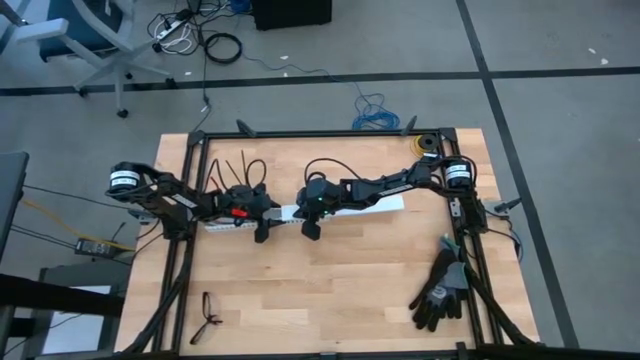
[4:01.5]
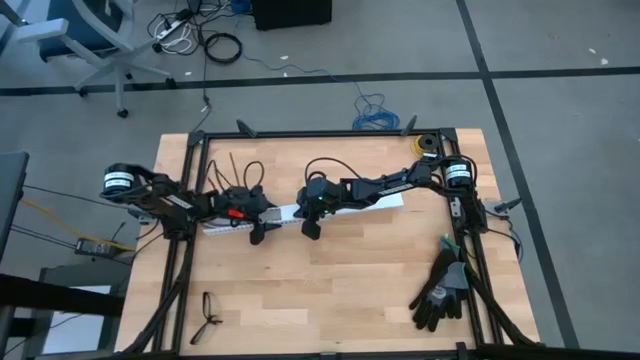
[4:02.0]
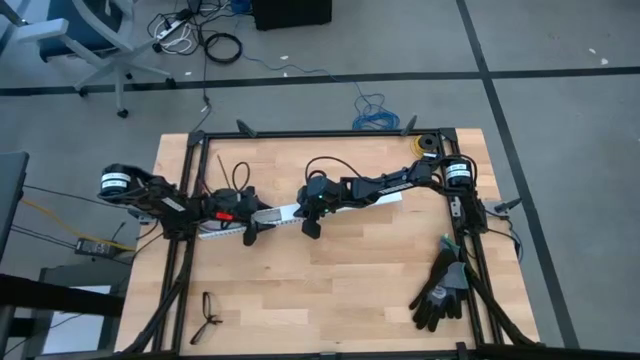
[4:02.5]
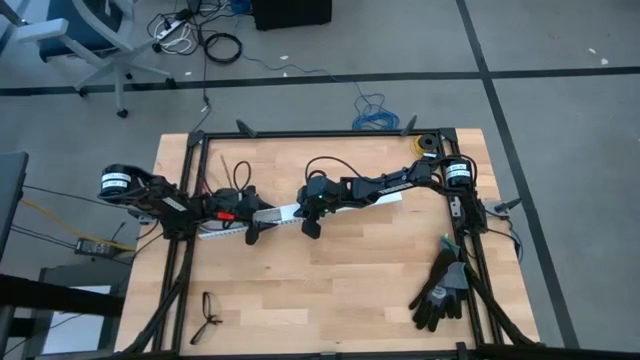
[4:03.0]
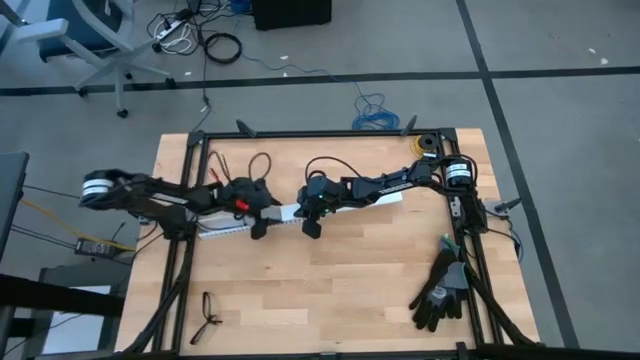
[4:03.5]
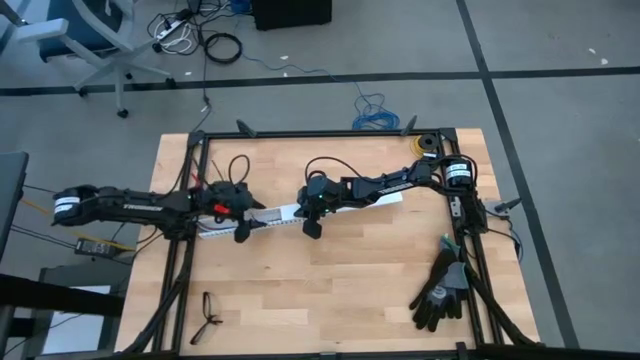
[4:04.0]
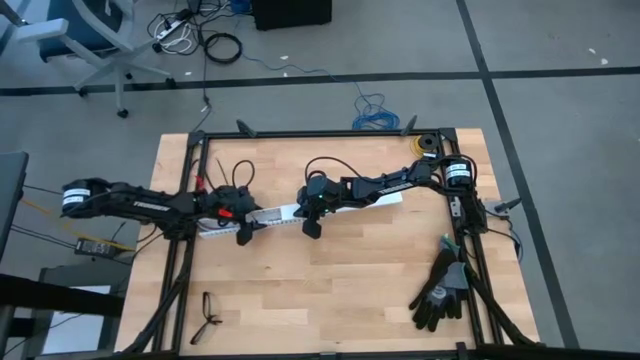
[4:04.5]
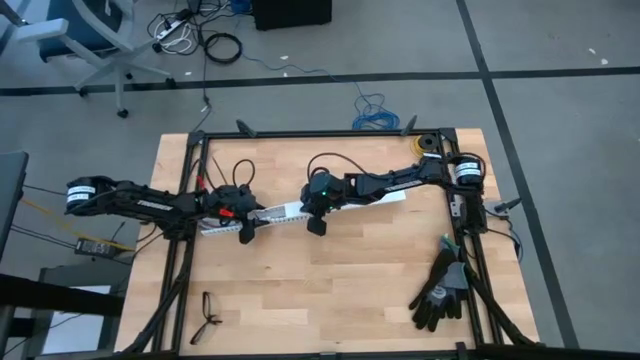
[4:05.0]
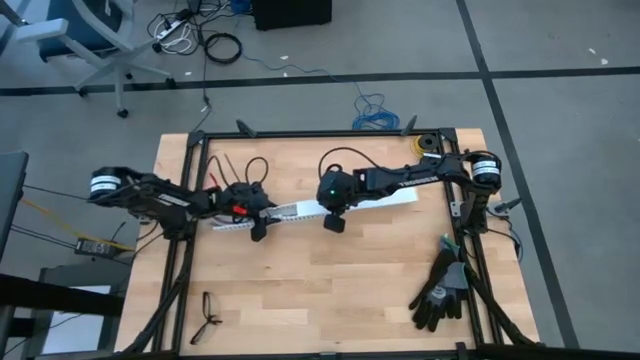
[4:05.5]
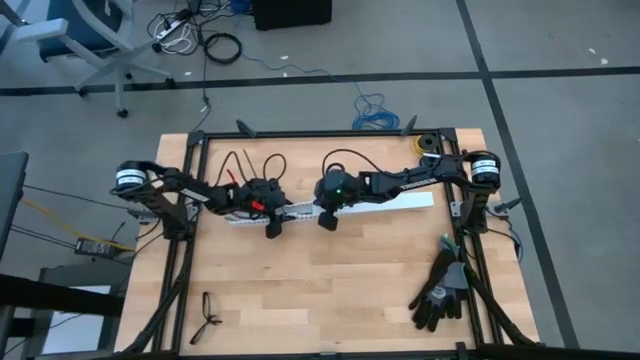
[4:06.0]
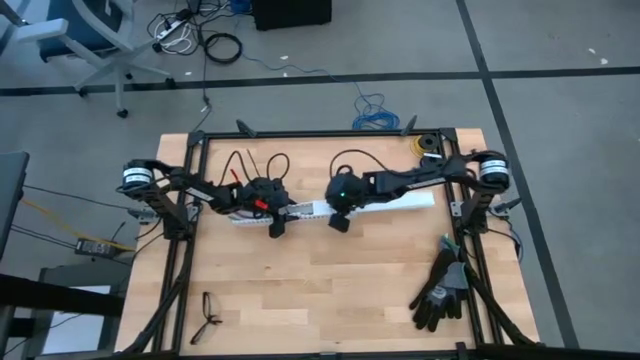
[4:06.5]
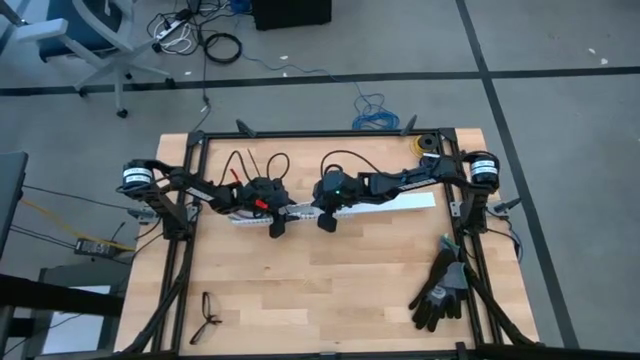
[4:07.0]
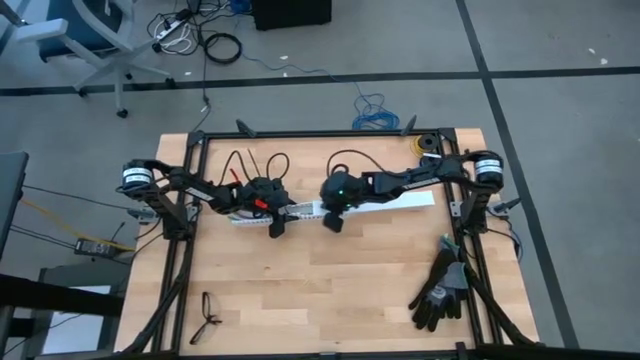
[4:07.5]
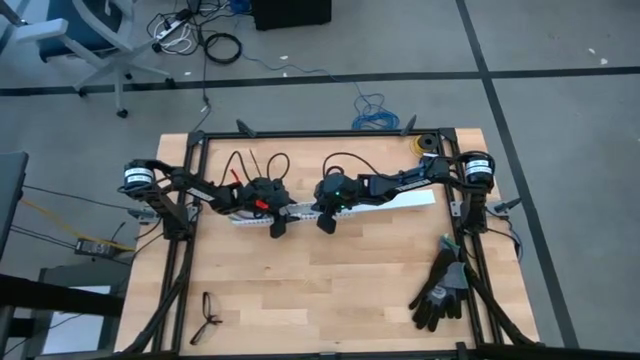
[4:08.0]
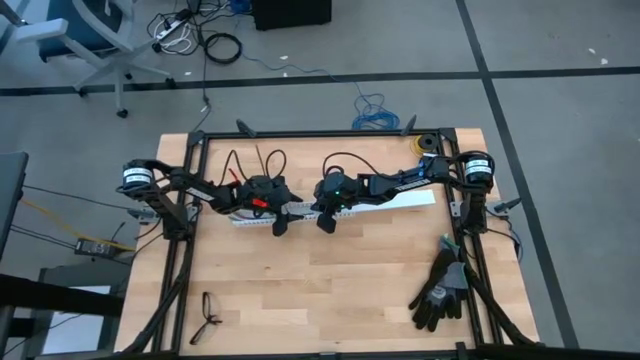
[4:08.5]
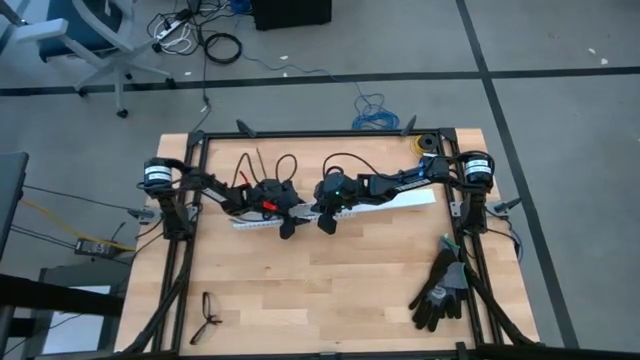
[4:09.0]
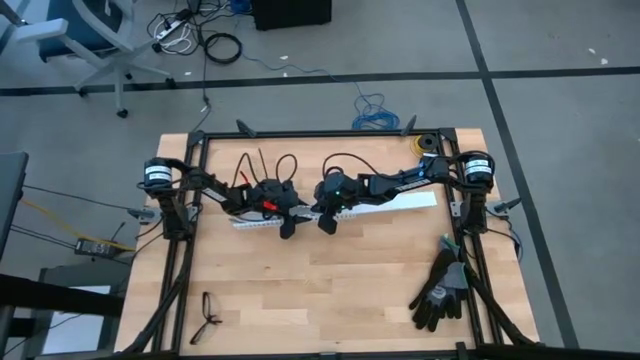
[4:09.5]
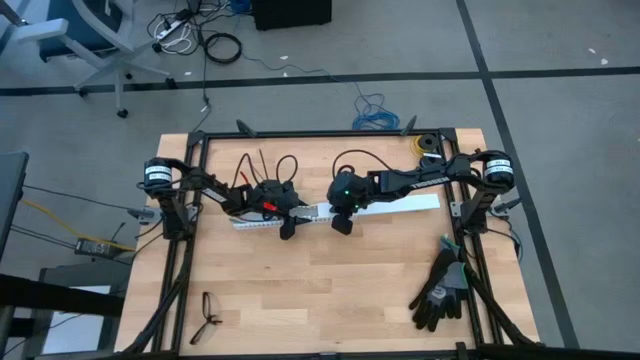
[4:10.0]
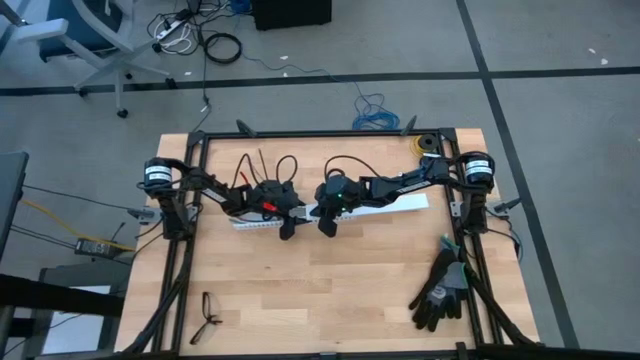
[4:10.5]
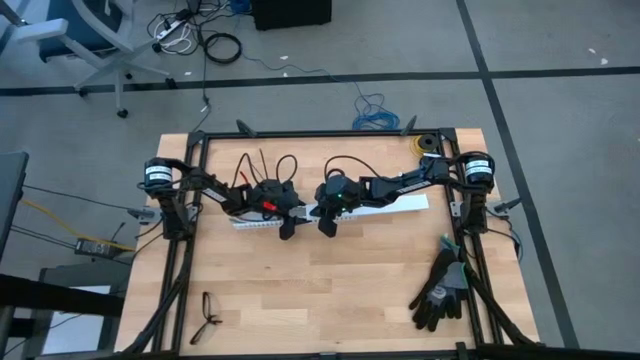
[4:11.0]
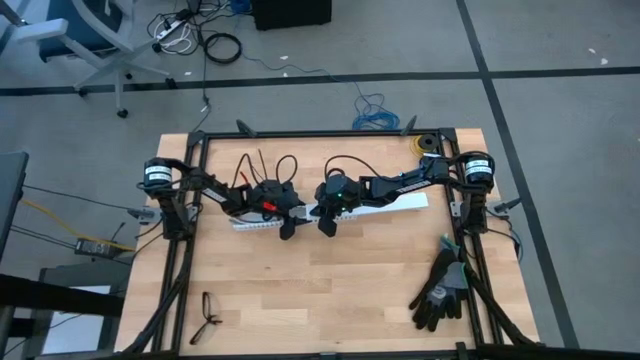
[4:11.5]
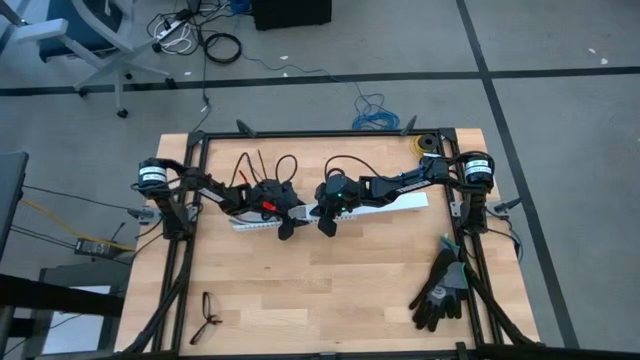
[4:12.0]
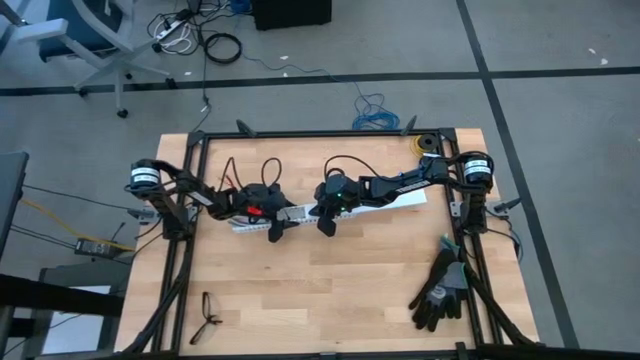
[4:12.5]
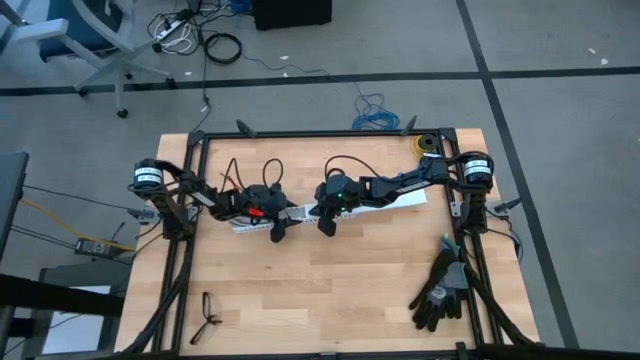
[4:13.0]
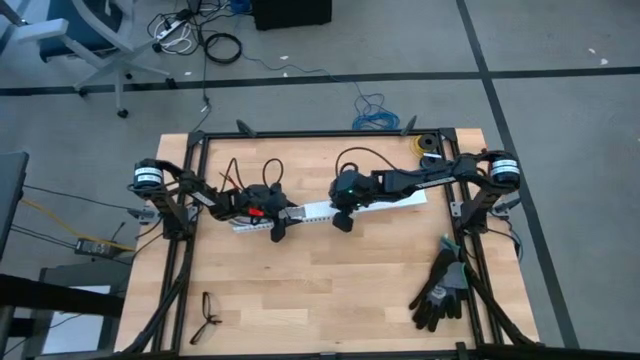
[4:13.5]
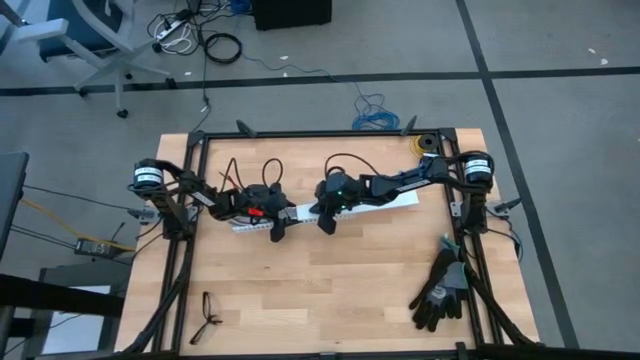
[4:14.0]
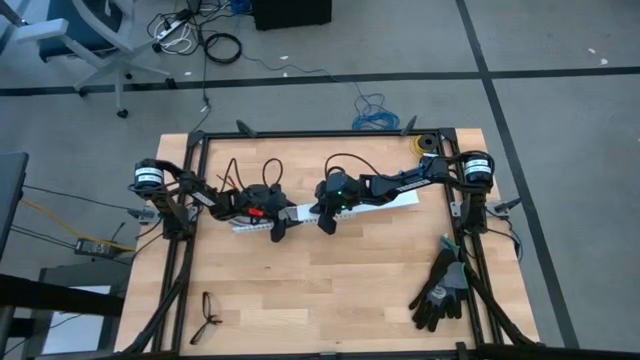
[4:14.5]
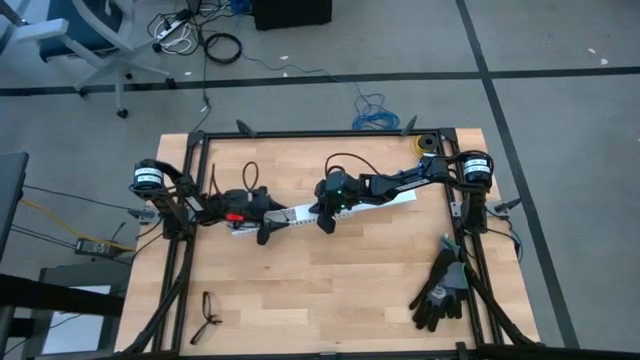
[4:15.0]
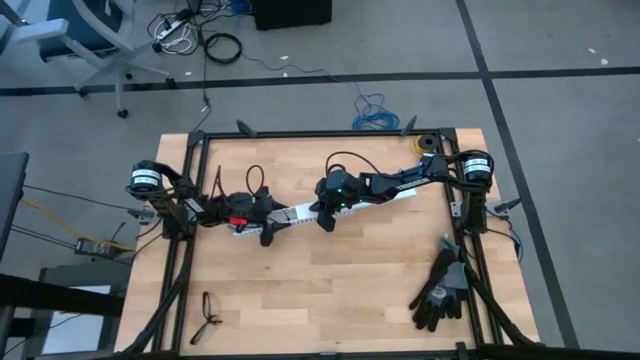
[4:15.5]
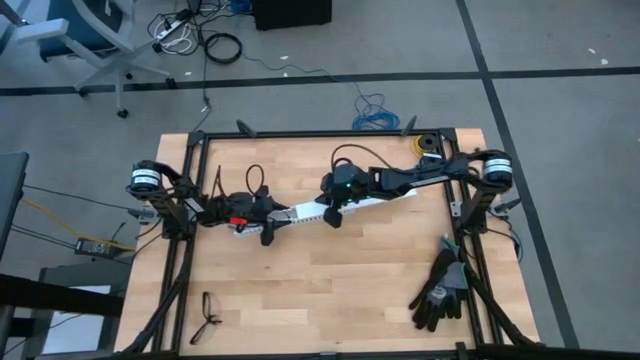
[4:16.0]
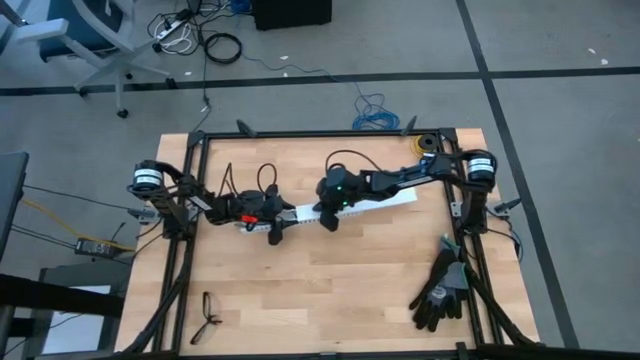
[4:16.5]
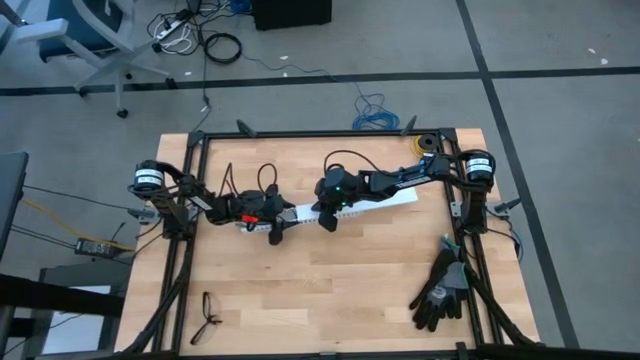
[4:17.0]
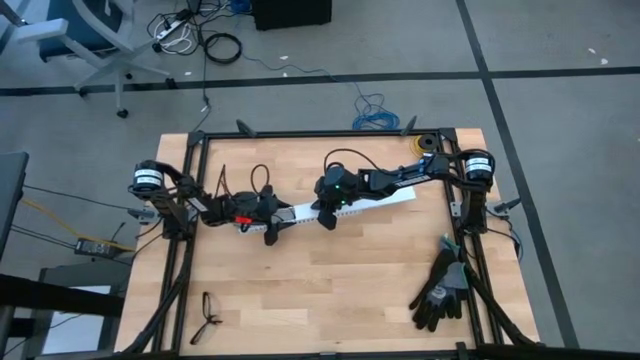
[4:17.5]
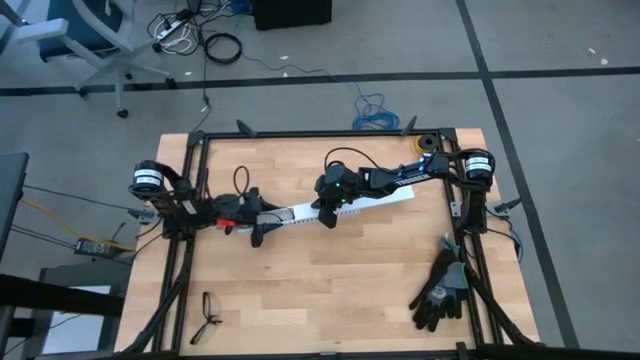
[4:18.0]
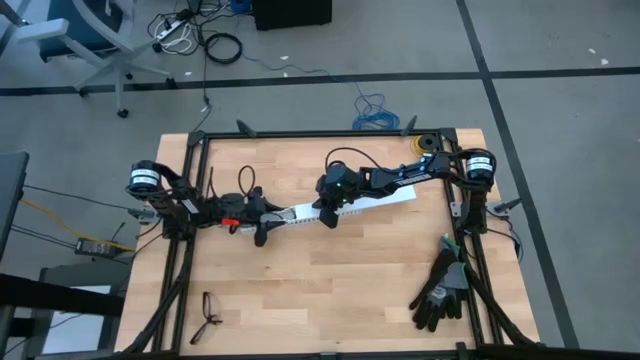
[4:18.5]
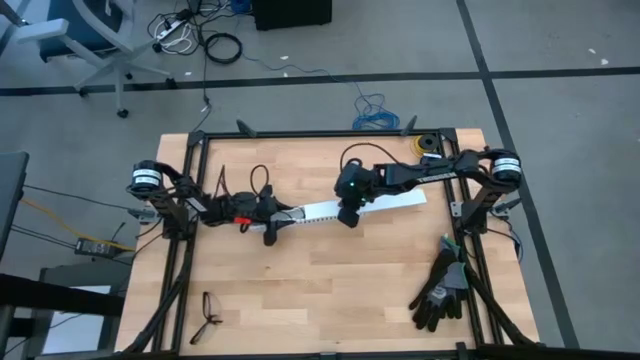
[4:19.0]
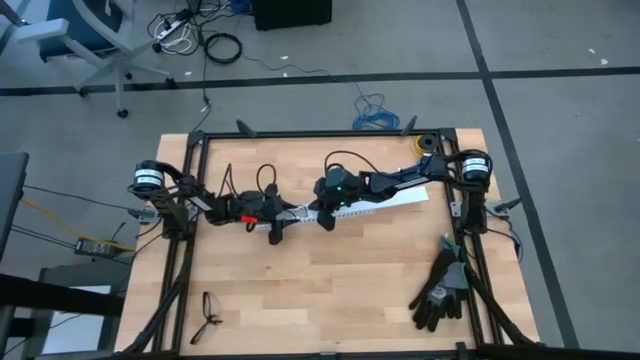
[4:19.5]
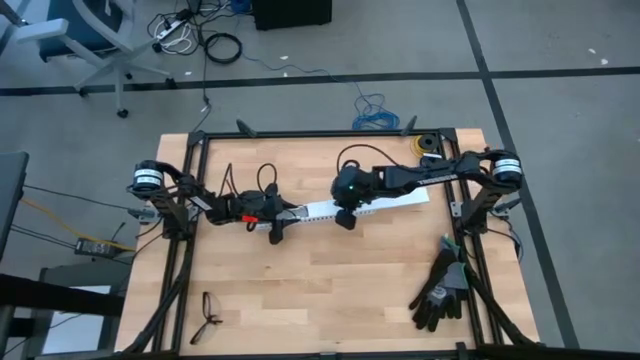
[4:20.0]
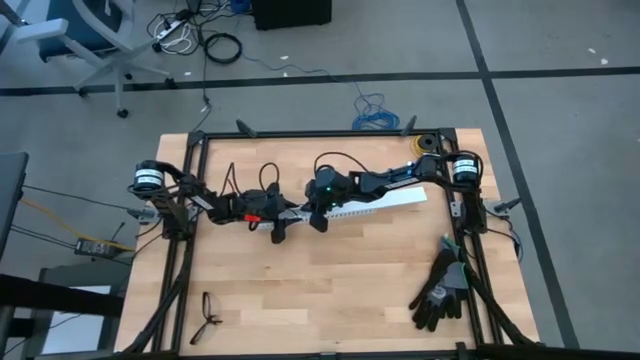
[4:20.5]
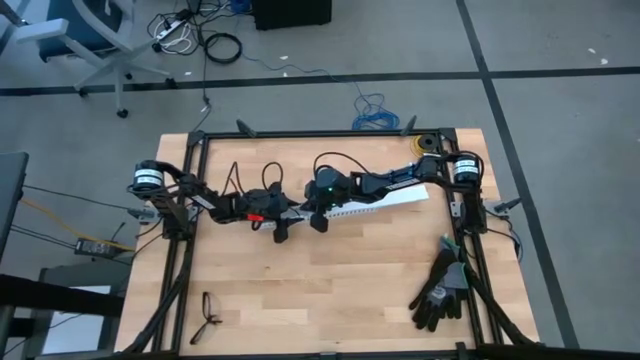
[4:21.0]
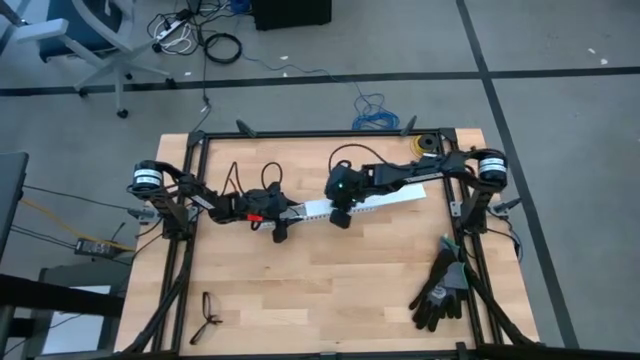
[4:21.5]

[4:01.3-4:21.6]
Task: Ziptie cables
Close the white cable duct with the white cable duct cover
